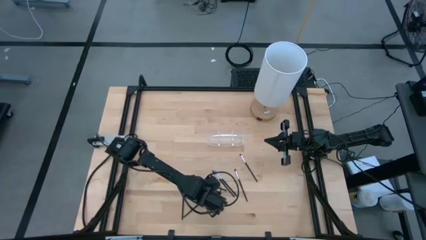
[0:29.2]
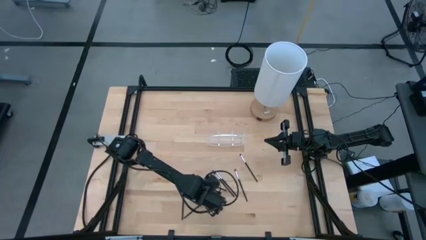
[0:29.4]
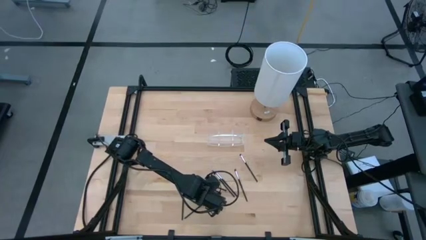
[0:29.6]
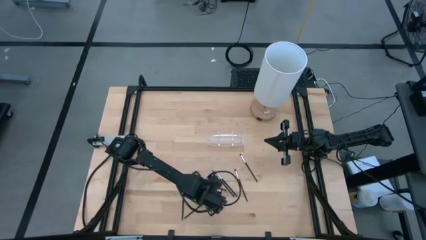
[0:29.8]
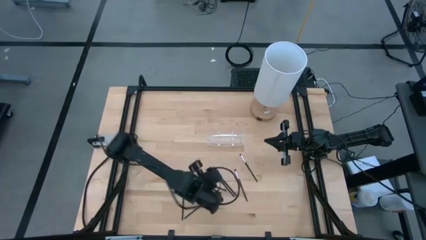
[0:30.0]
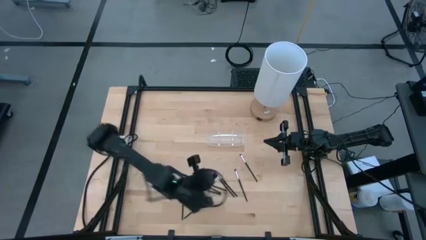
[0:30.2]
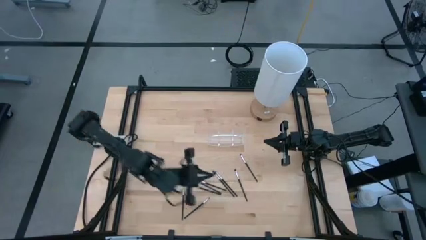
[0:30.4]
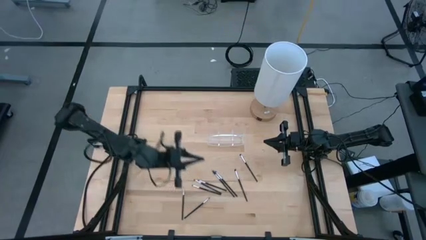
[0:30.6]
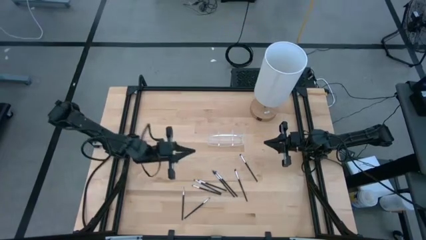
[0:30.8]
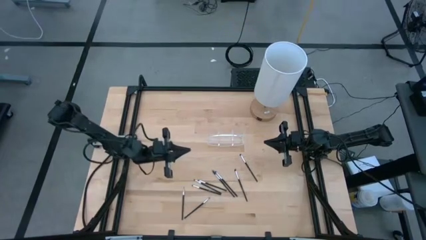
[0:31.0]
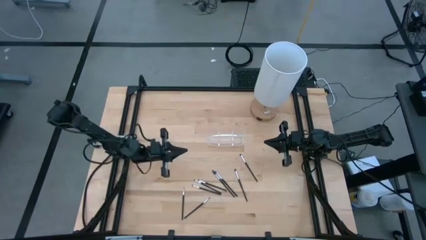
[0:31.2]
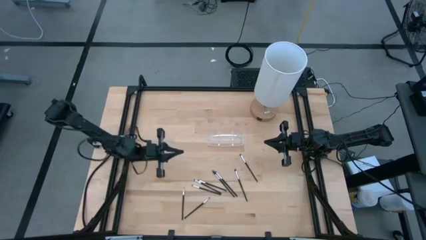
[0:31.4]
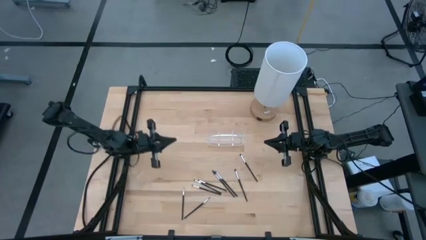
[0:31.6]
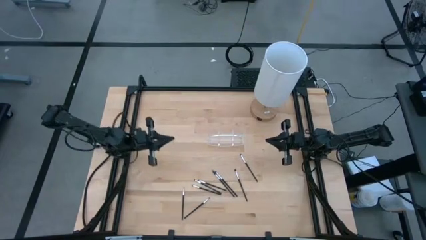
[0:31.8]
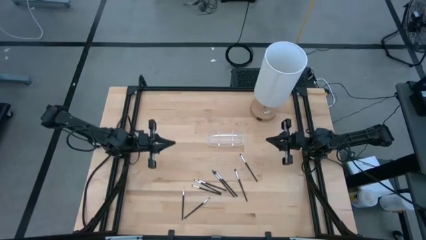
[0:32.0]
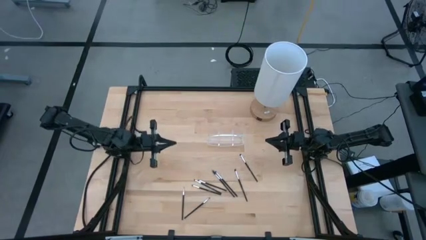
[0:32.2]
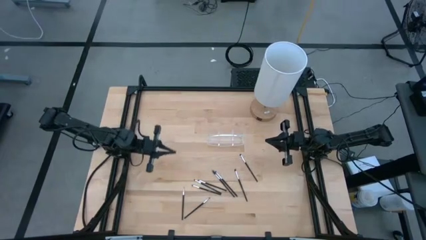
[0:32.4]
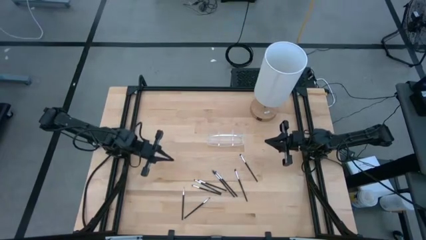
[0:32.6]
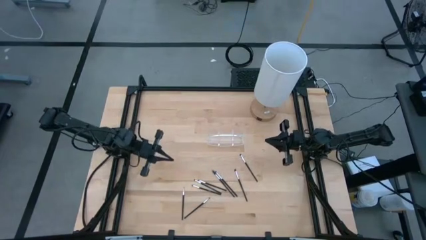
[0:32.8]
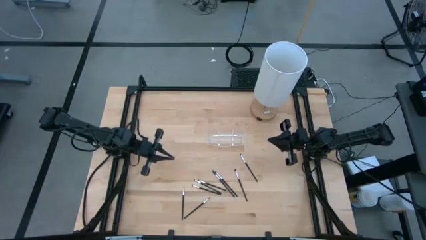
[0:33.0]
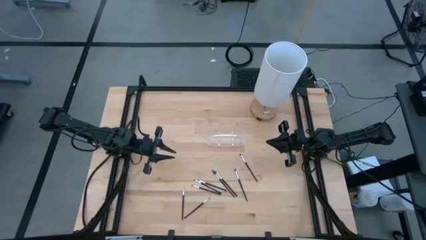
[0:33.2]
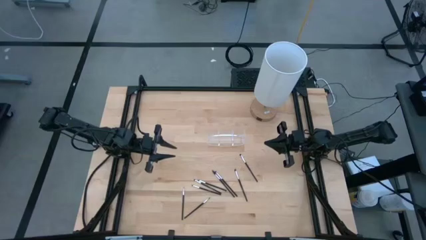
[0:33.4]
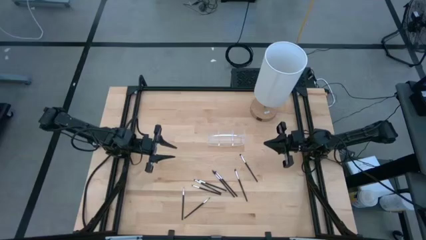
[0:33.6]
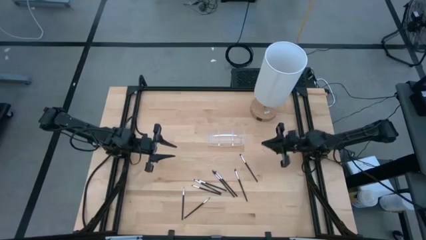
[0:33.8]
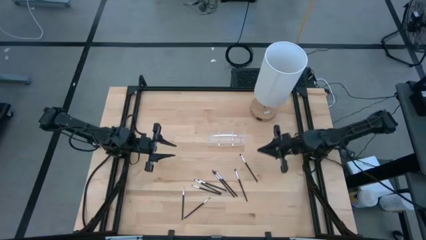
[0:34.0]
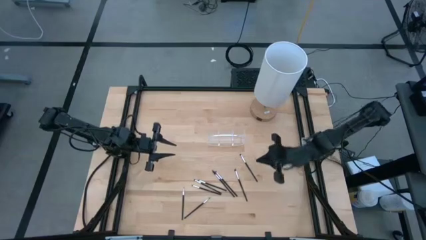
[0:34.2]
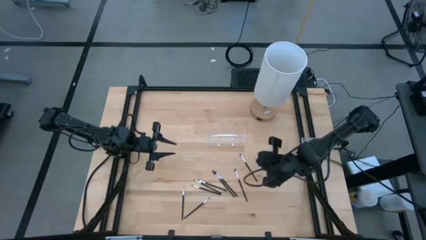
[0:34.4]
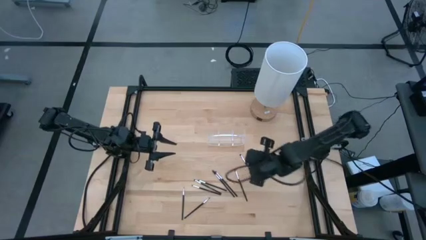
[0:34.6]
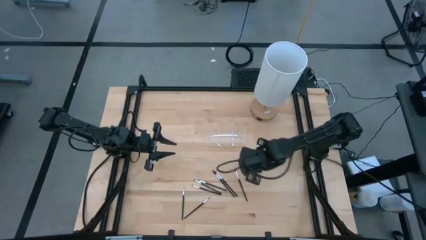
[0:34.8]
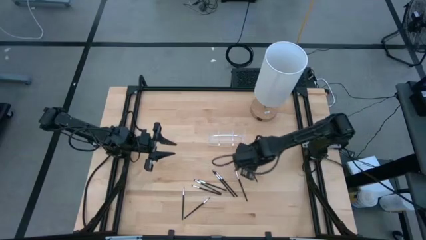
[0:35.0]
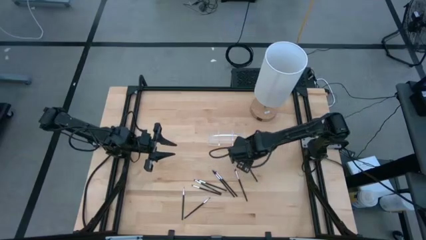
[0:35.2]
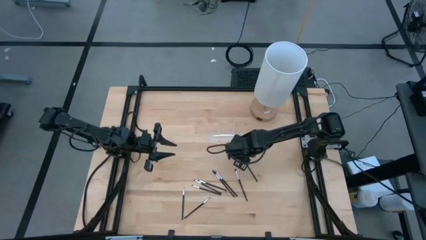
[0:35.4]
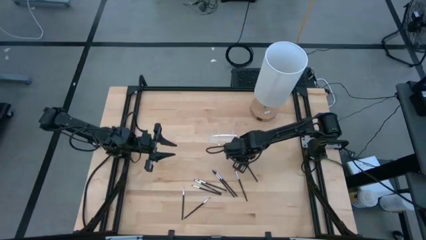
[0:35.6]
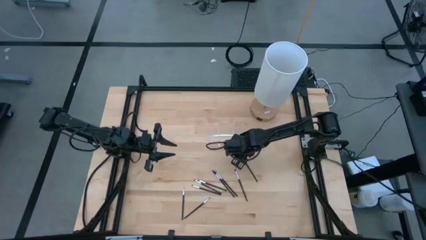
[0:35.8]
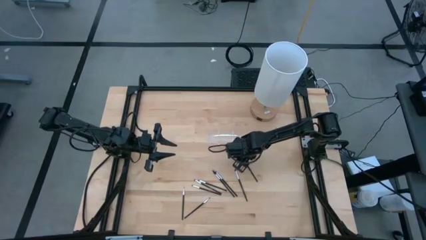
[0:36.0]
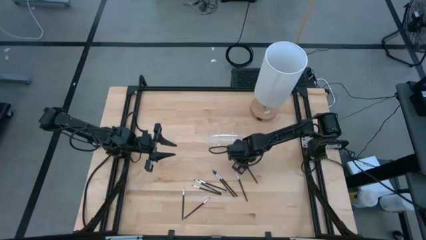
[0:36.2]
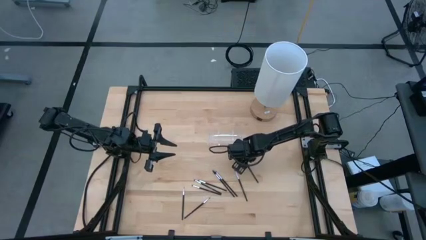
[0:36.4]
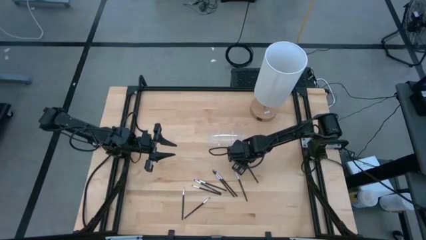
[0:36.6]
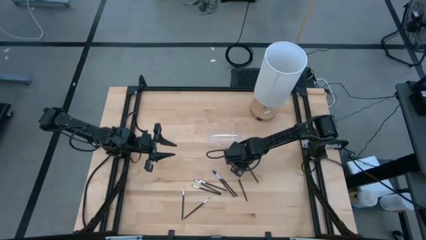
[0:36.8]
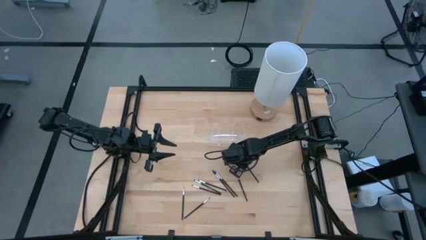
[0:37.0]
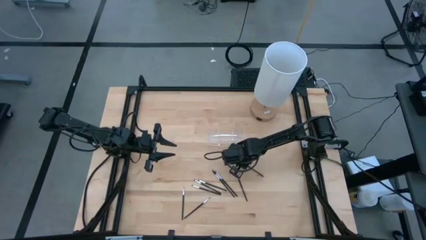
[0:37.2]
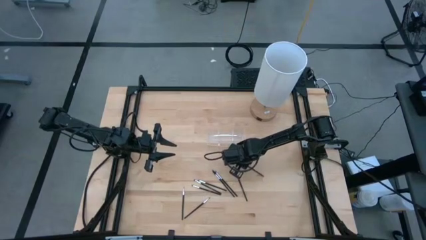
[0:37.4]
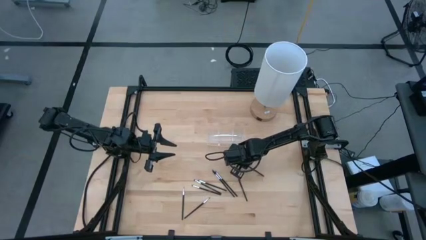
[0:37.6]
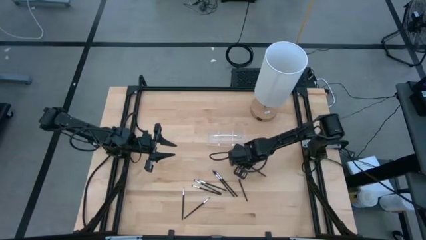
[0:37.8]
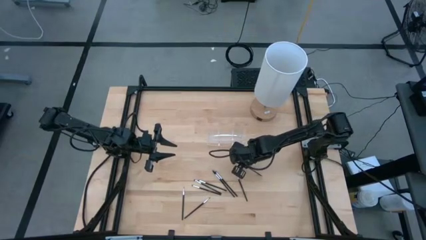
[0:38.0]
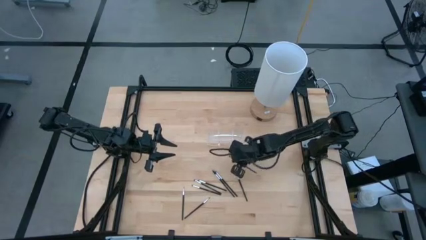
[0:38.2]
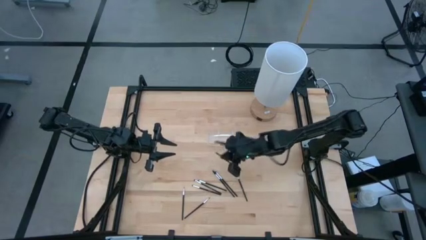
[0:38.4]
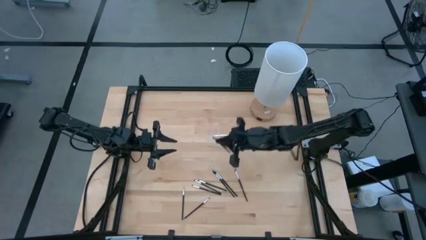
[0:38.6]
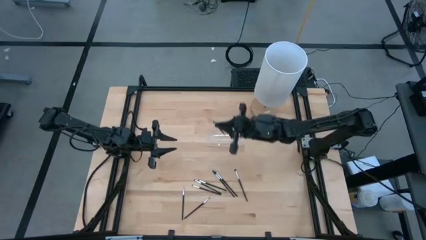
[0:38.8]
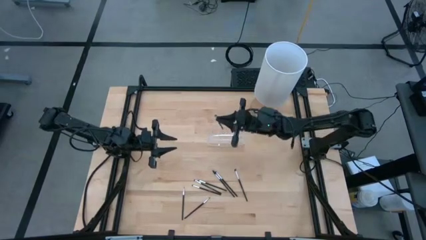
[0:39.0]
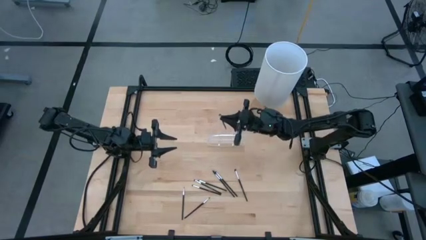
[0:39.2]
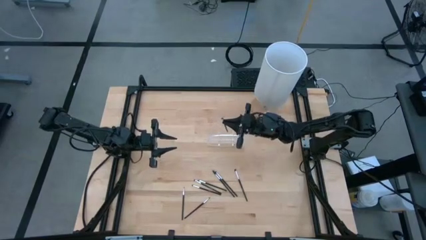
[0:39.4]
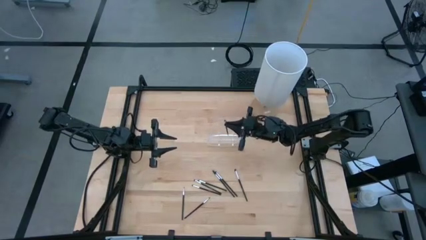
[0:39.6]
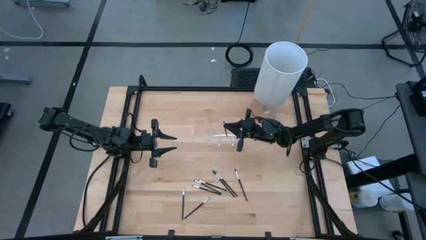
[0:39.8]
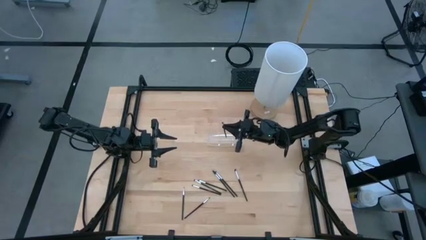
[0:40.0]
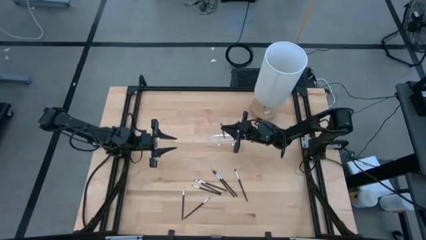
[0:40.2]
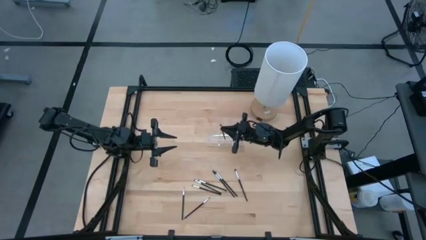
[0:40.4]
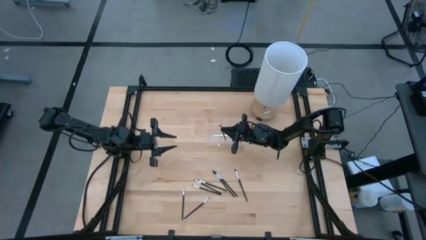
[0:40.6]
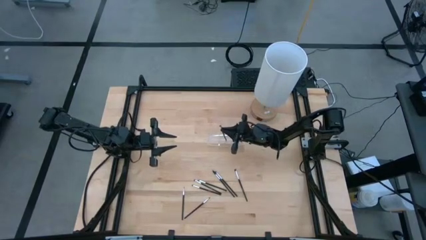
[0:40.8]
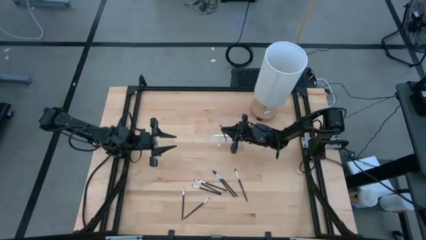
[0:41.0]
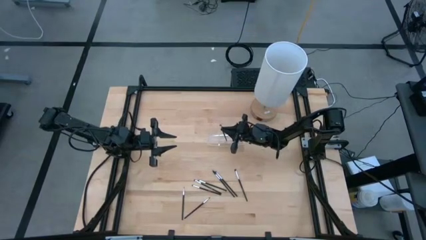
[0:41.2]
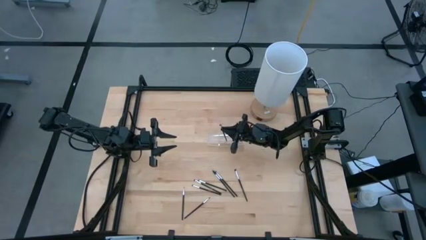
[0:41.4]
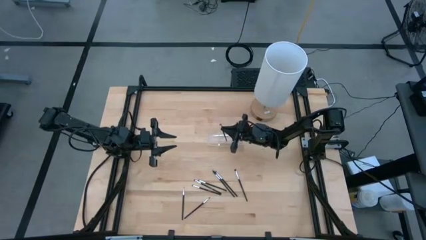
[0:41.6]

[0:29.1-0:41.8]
Task: Put items in baskets/containers
Put the black eyeshadow brush into the middle section of the transparent organizer
